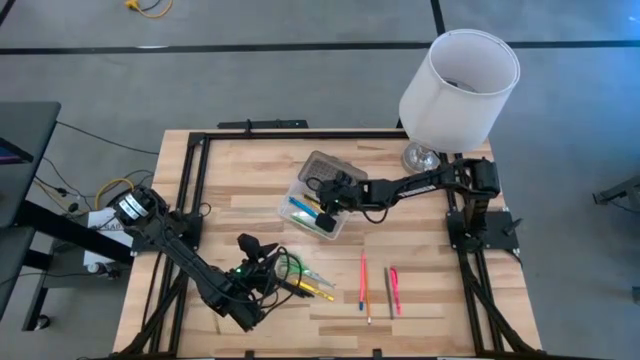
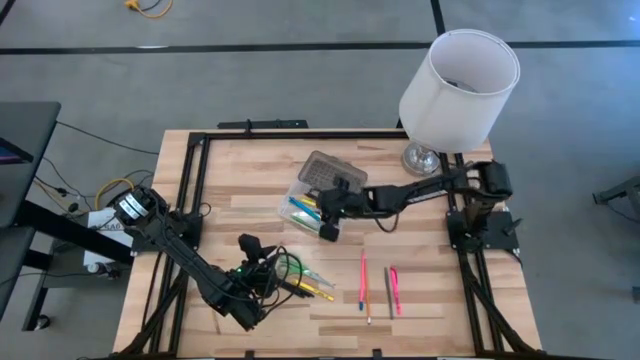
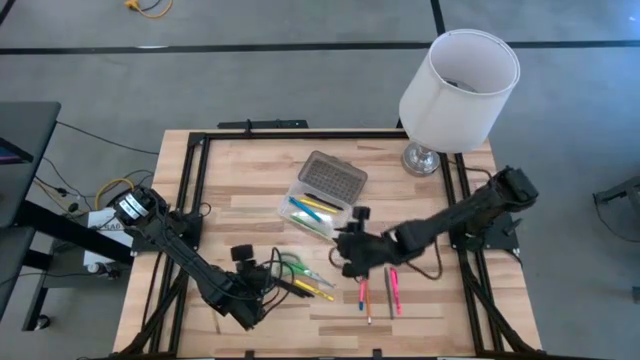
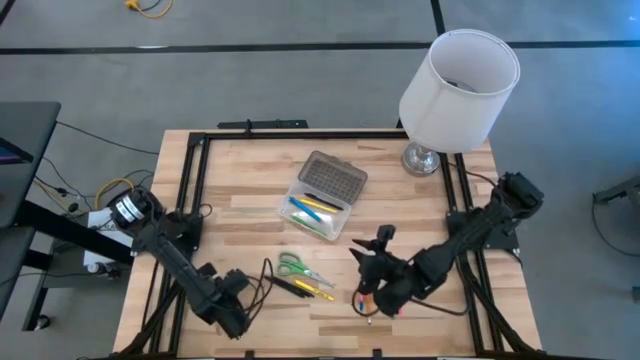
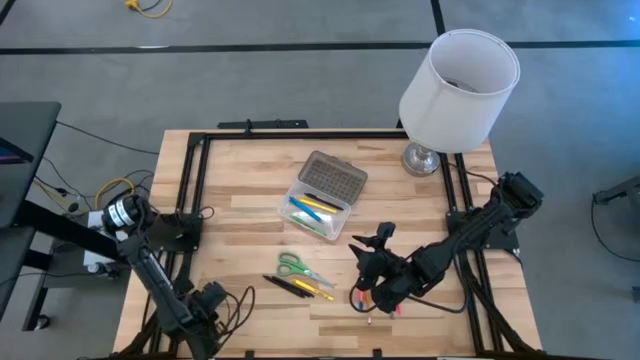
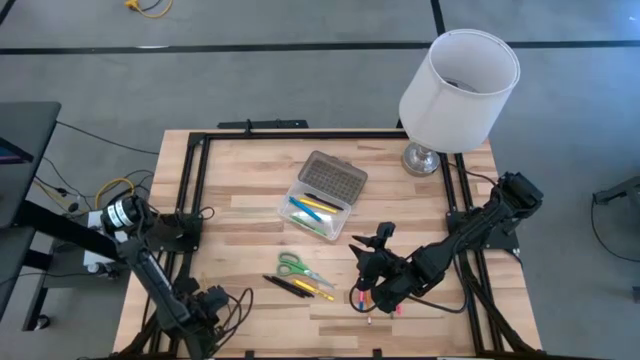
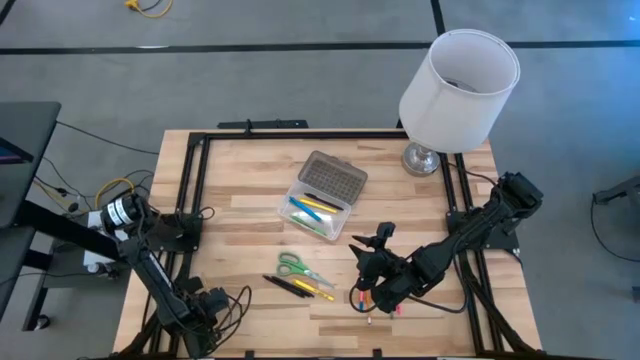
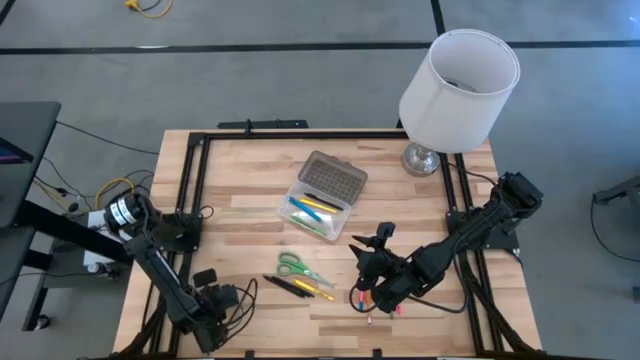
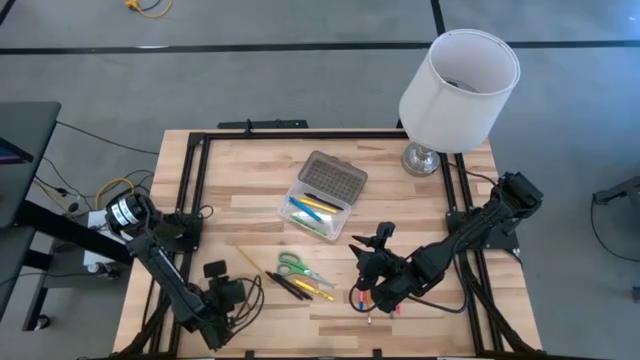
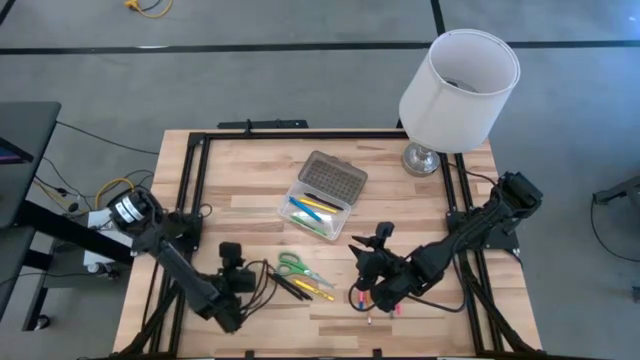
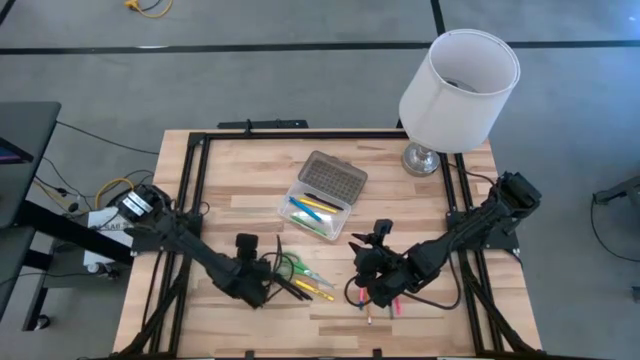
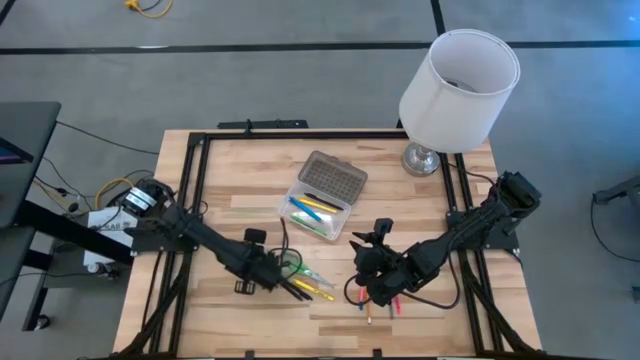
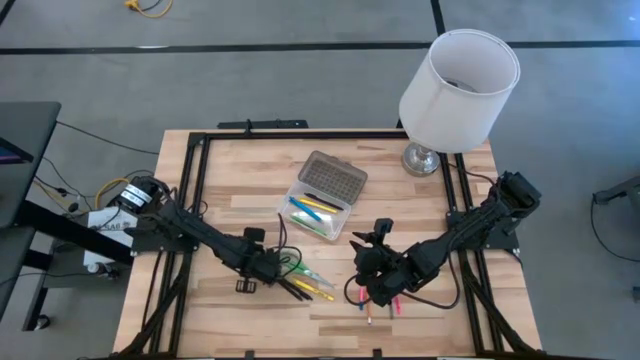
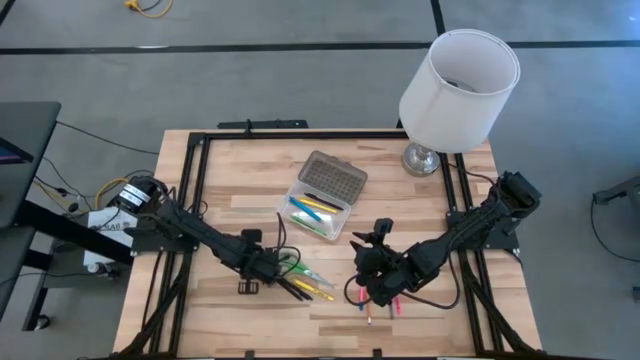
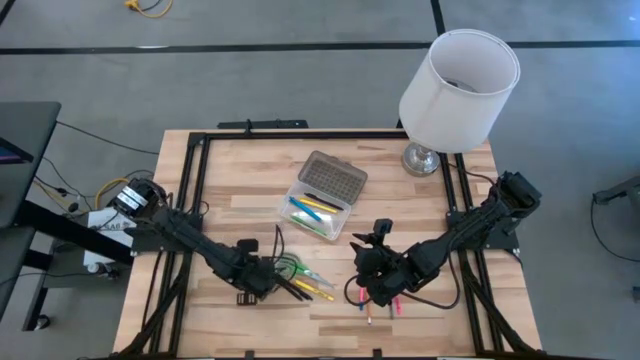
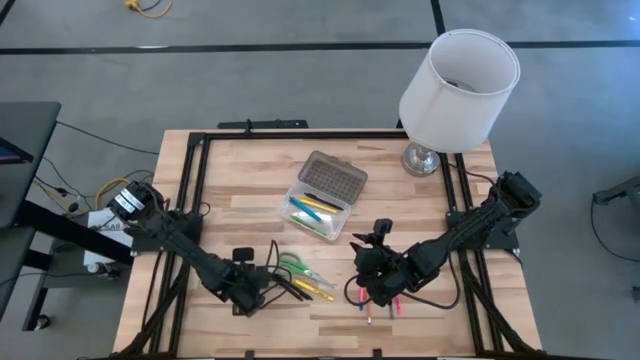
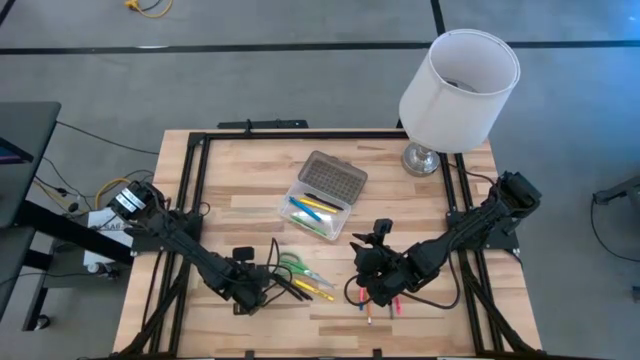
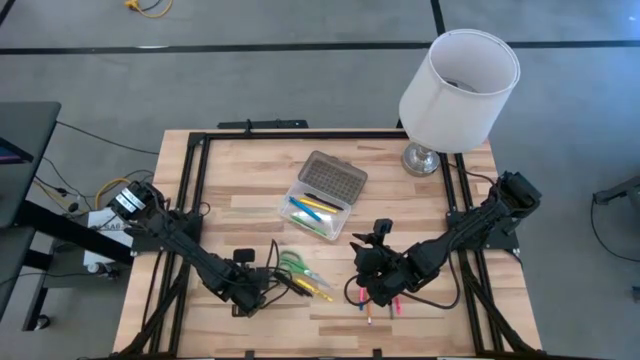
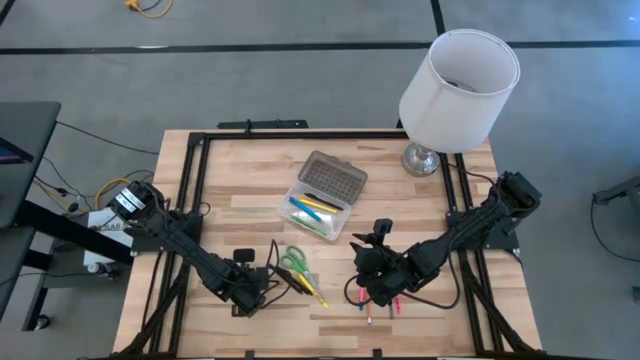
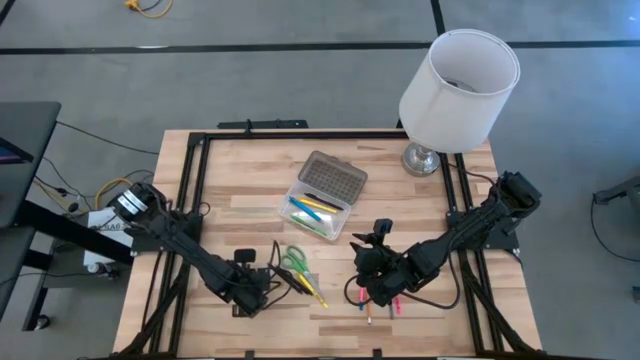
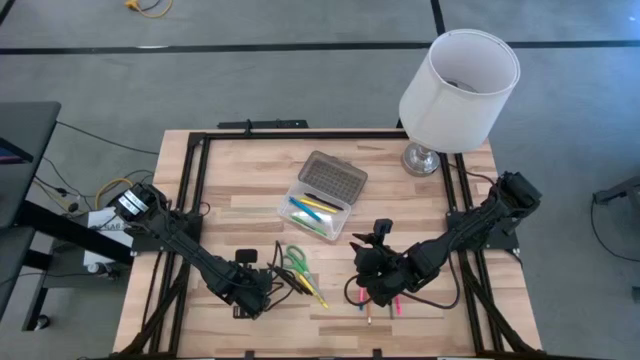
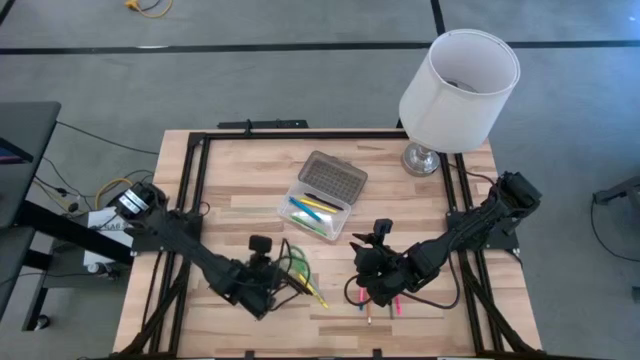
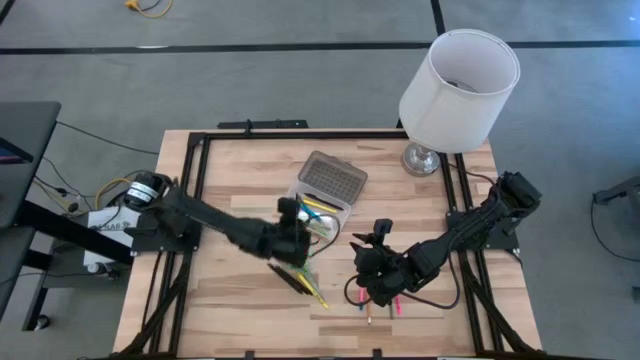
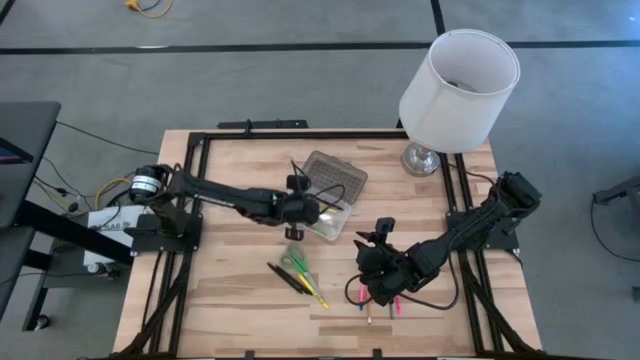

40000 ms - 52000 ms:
Task: Pick & place school supplies into a supply box
Put the yellow supply into the gray supply box

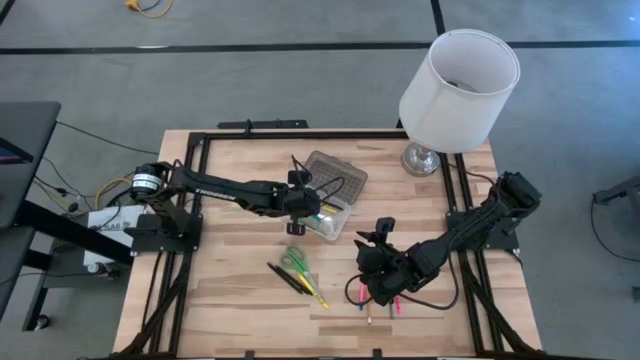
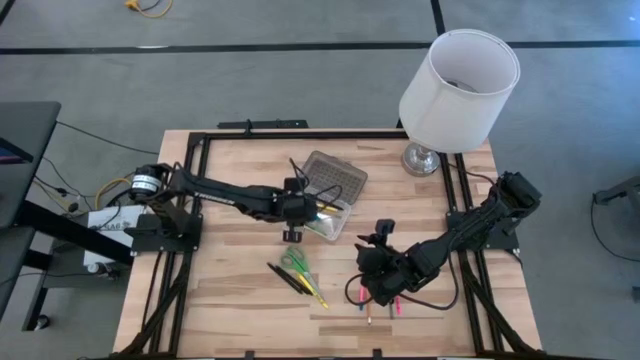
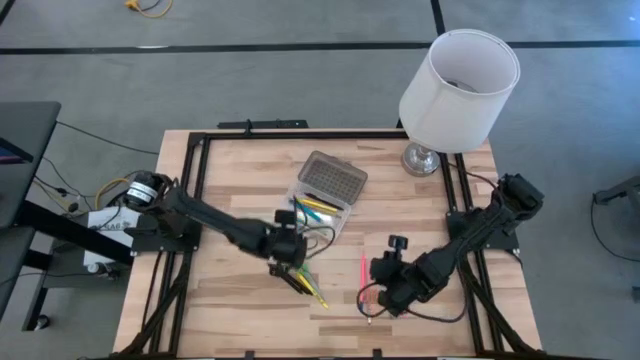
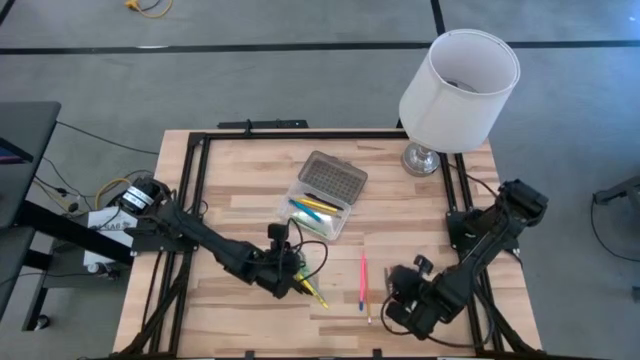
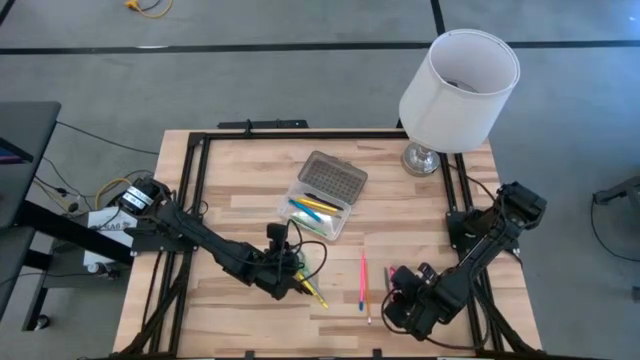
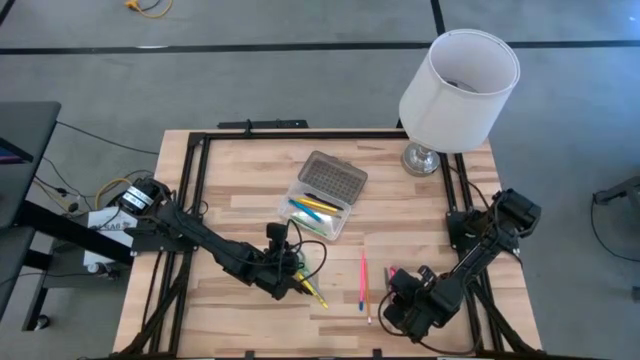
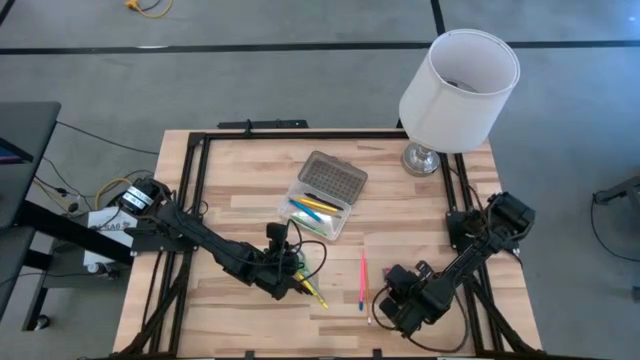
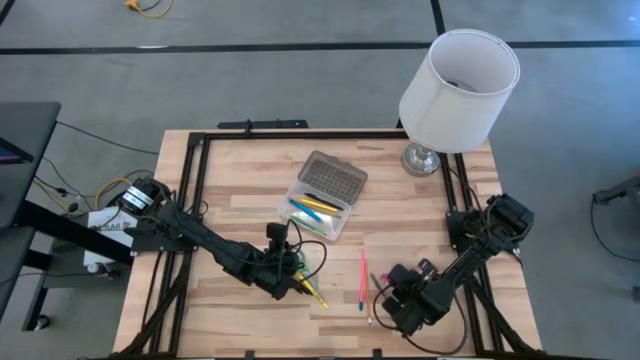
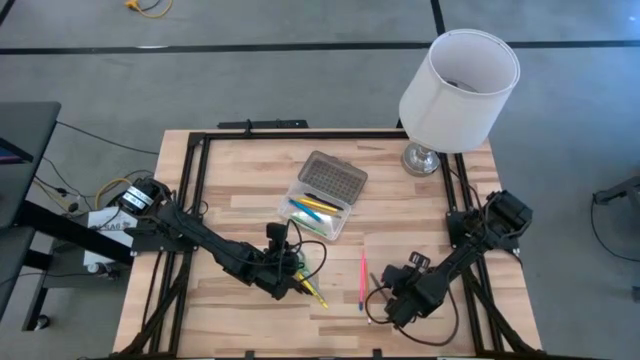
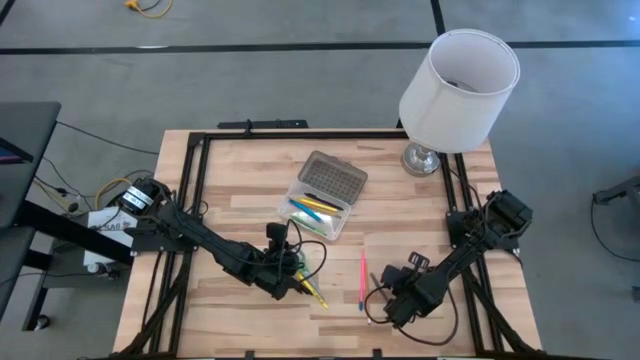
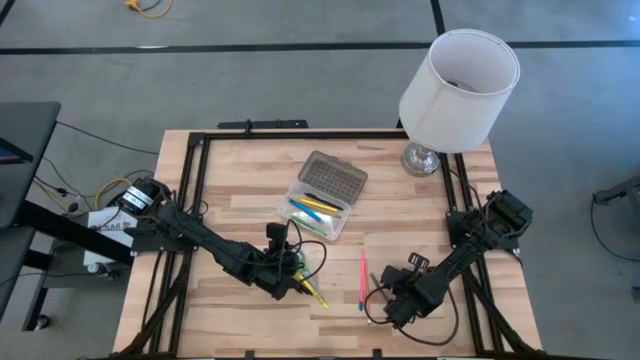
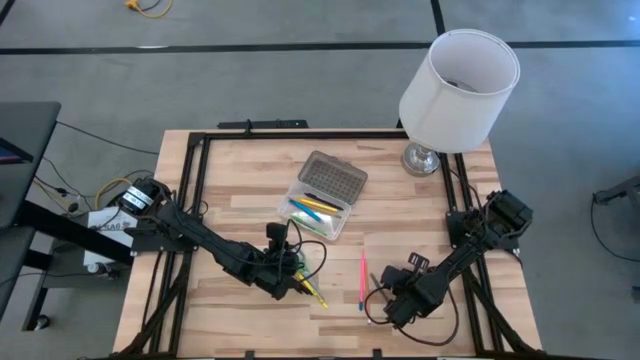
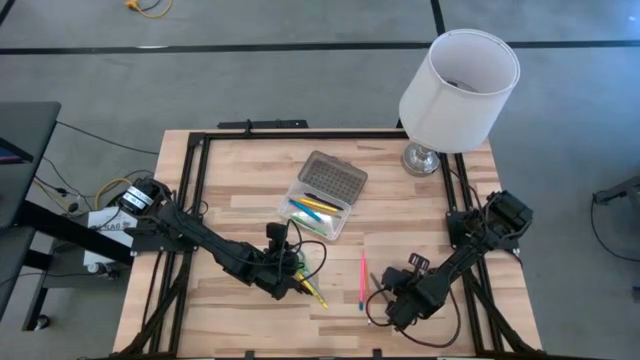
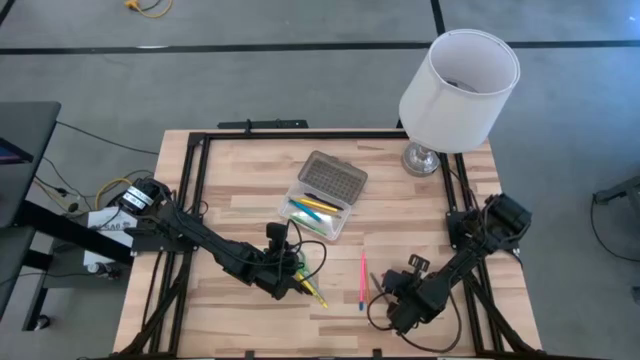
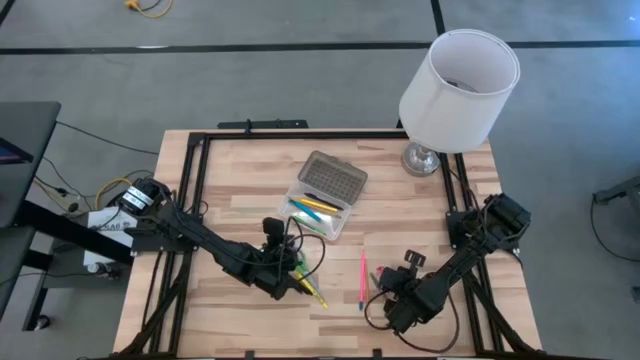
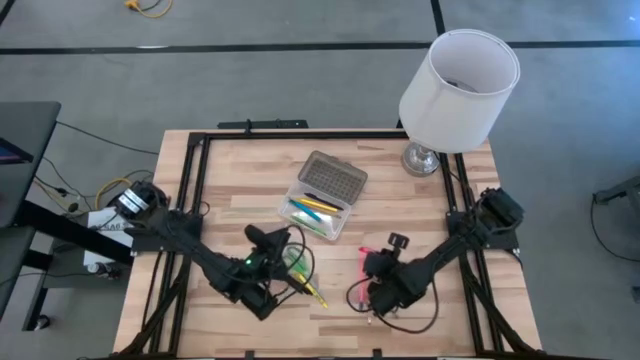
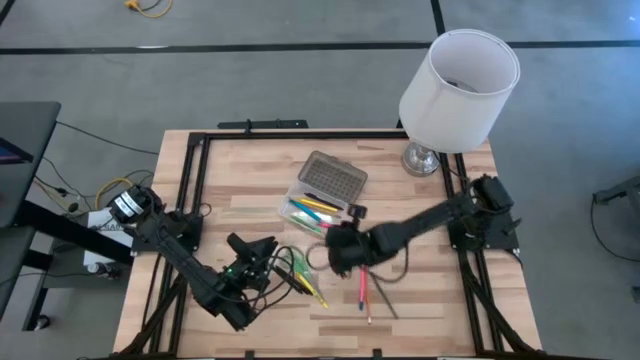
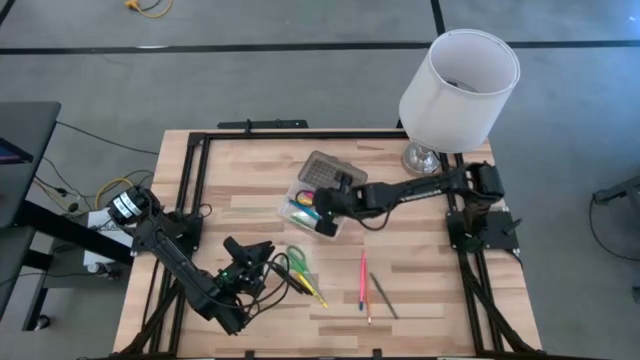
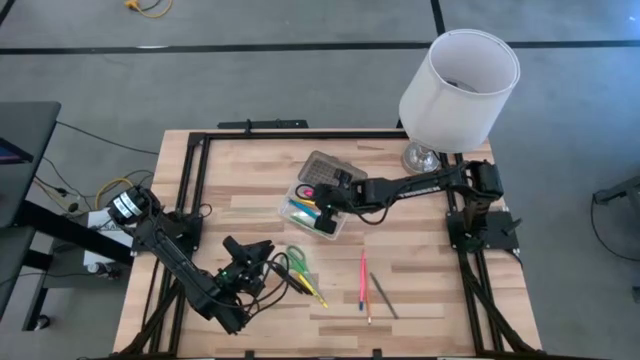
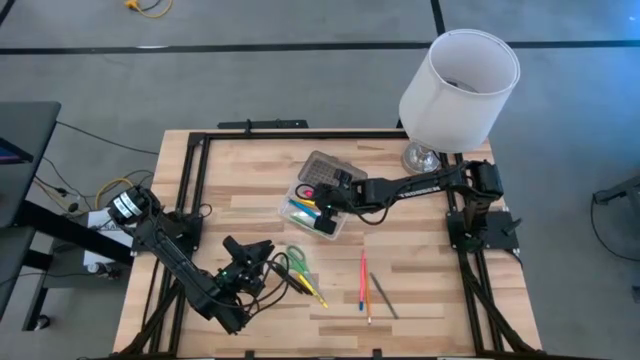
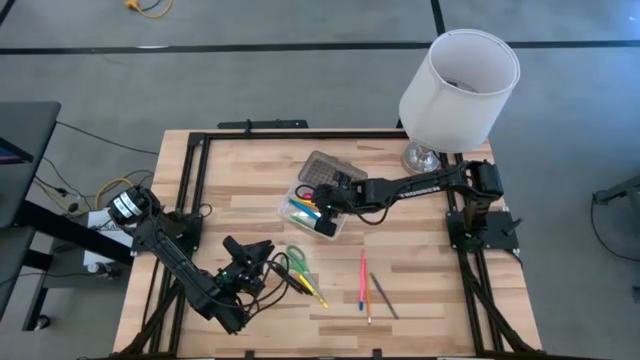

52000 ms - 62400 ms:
Put the pink pen into the gray supply box
